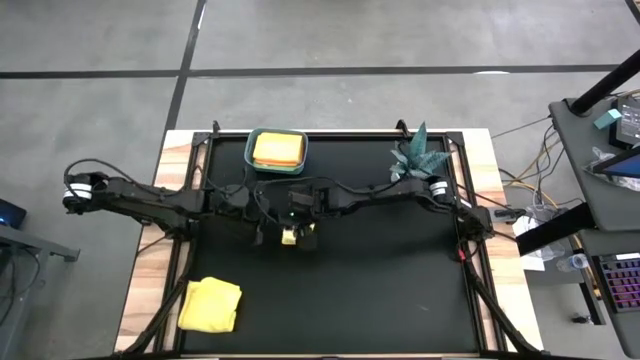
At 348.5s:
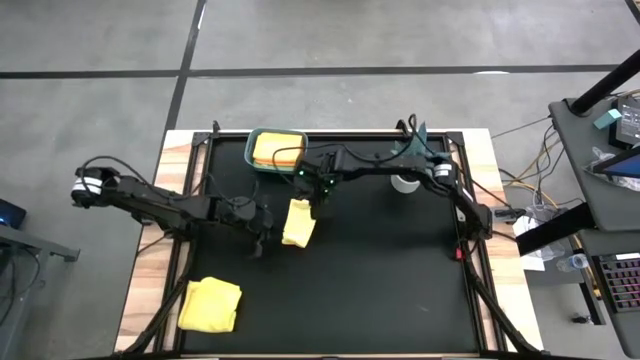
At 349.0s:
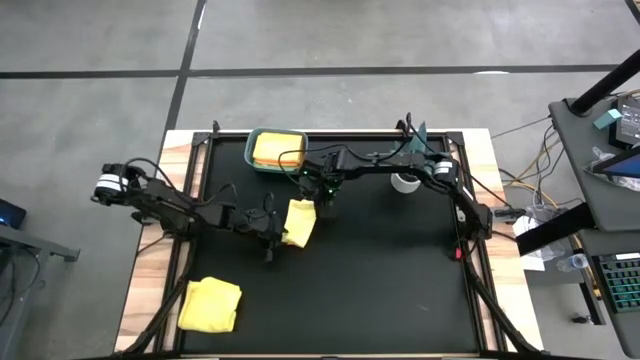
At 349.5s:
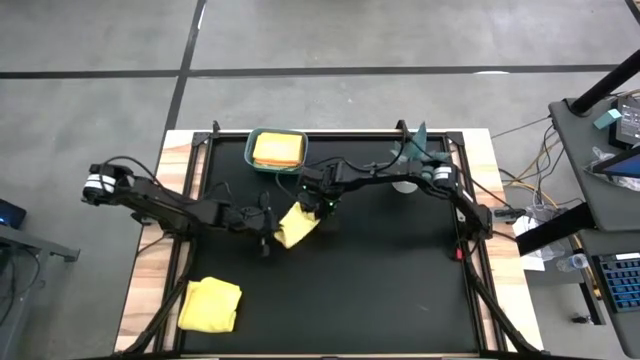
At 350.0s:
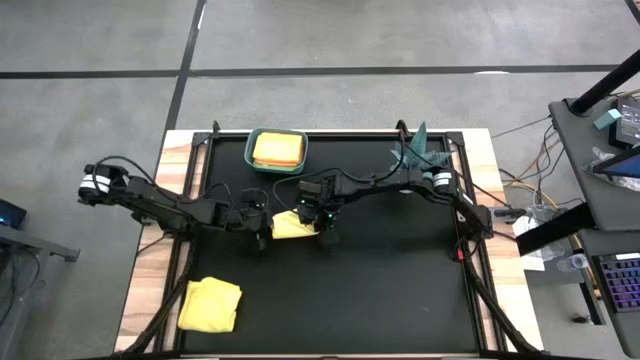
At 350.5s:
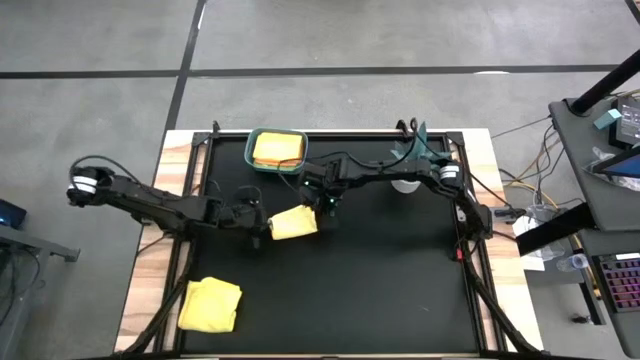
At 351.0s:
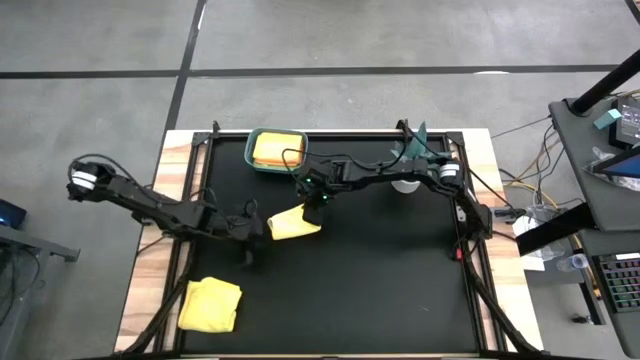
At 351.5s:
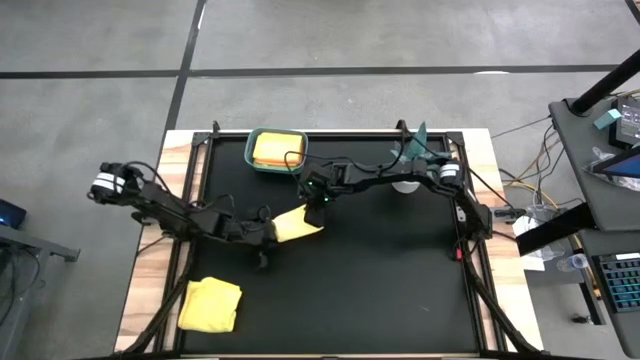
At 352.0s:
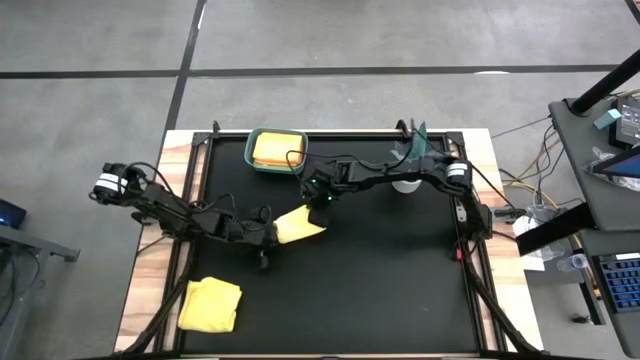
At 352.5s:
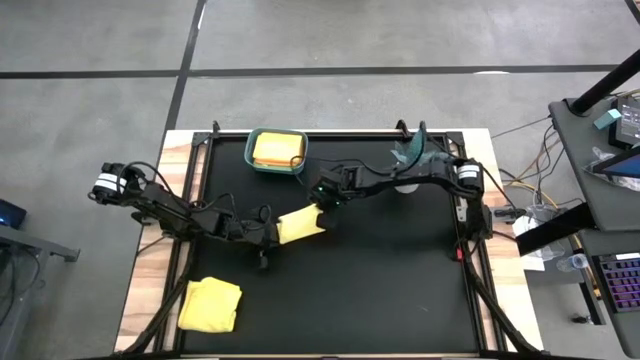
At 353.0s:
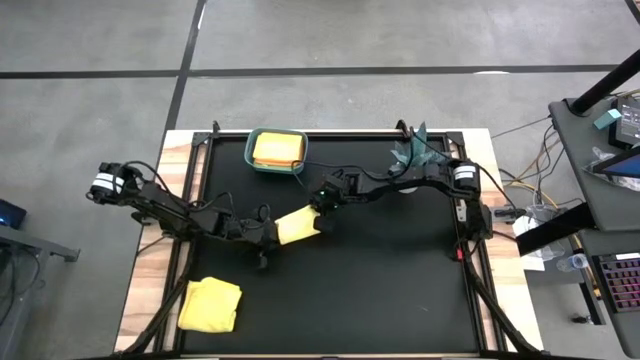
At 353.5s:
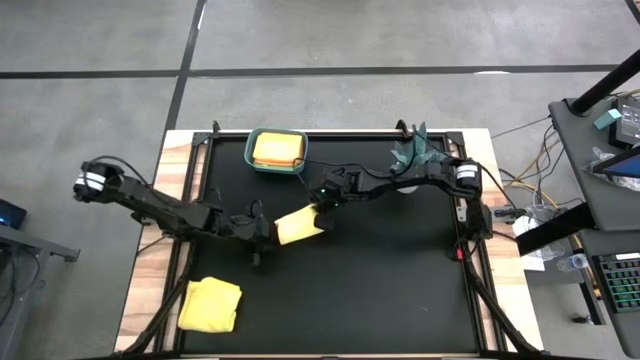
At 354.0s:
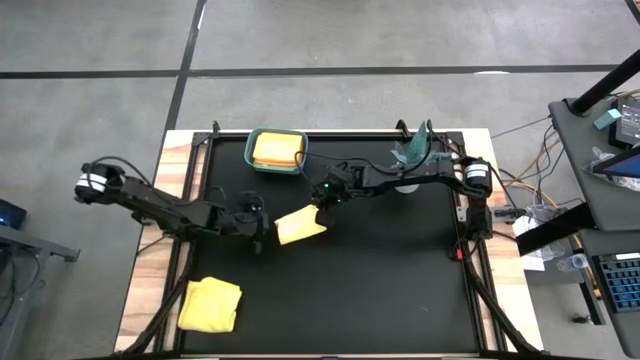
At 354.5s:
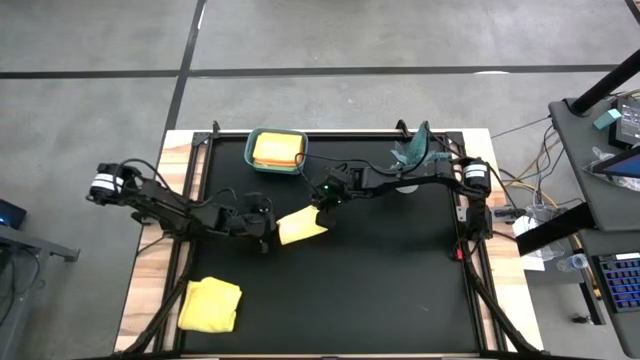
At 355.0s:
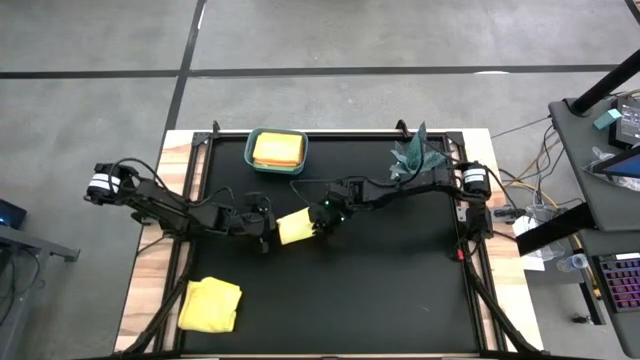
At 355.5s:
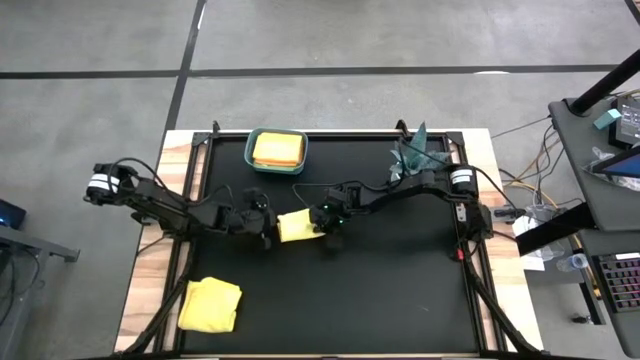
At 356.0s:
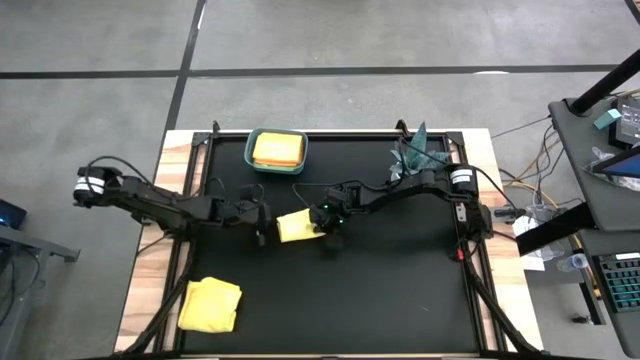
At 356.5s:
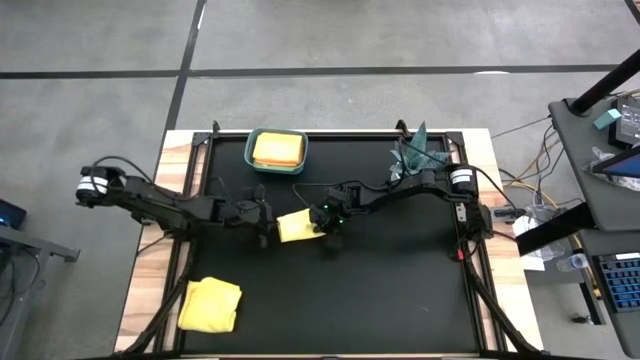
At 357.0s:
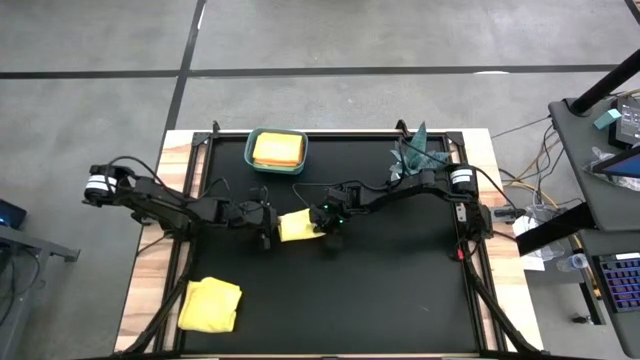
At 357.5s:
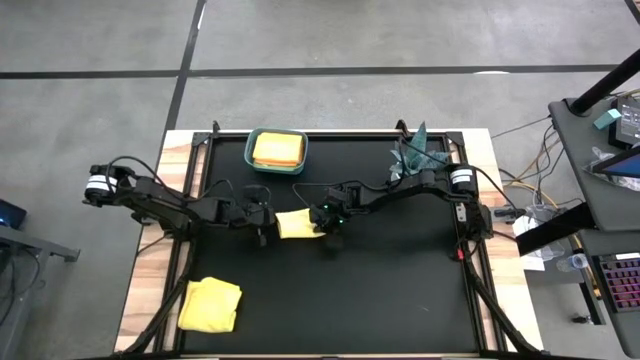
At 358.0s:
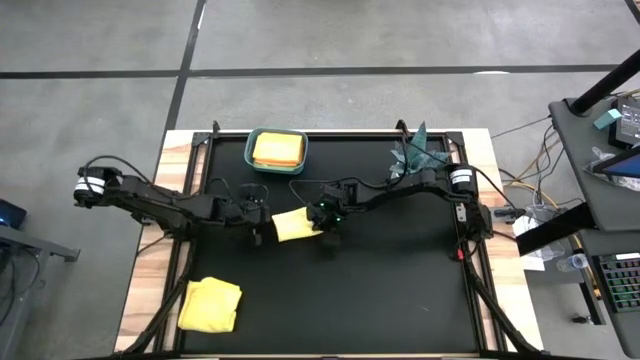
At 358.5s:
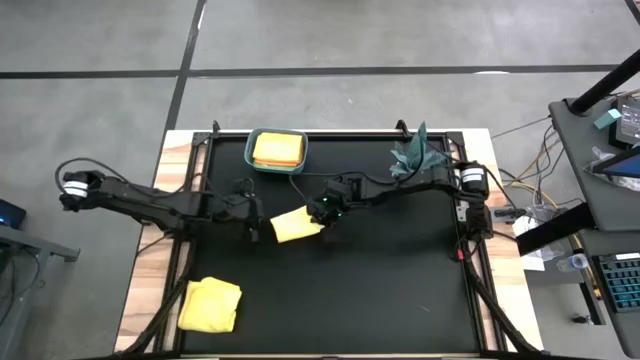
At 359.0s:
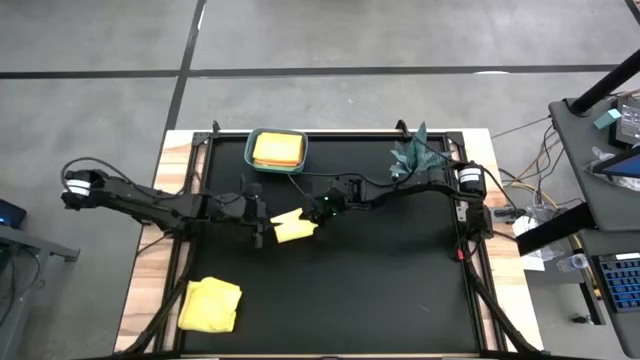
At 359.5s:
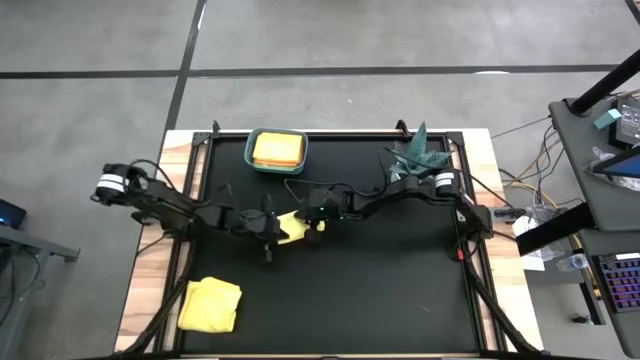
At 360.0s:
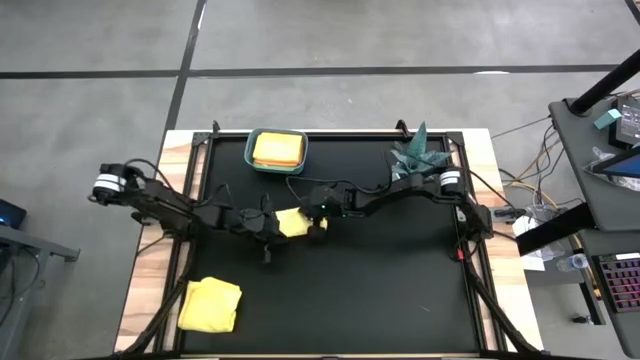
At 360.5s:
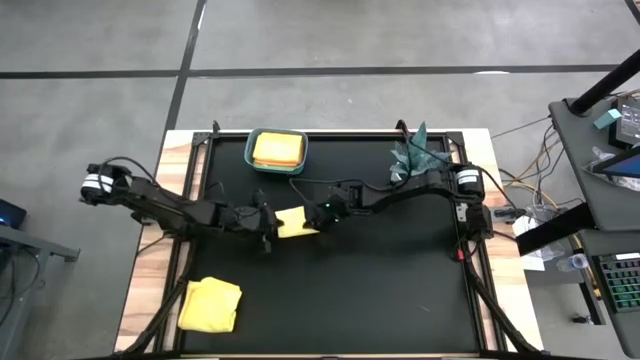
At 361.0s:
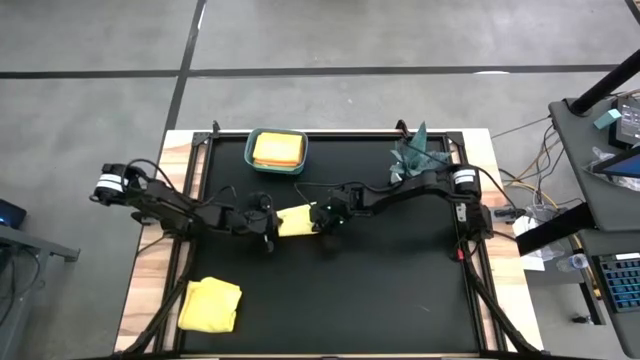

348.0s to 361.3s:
Task: Fold microfiber towels
Fold the right yellow microfiber cloth

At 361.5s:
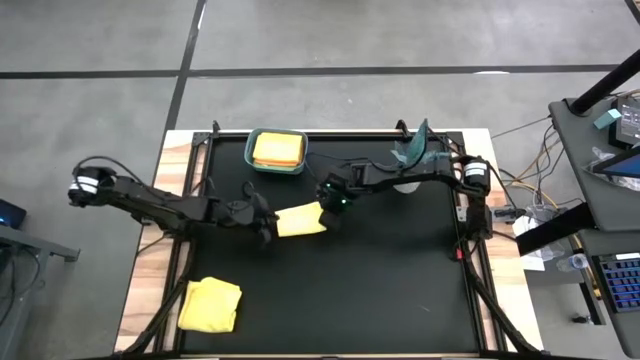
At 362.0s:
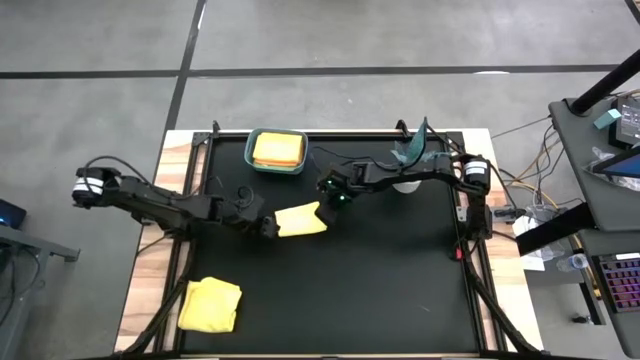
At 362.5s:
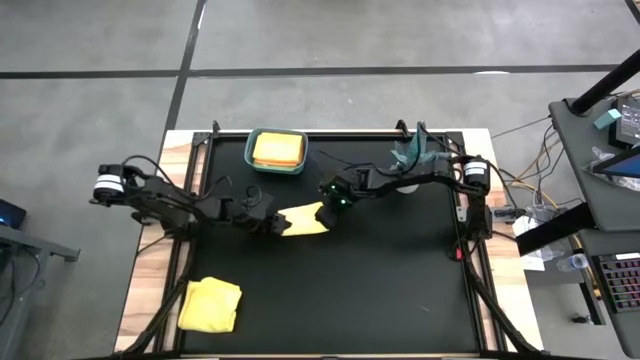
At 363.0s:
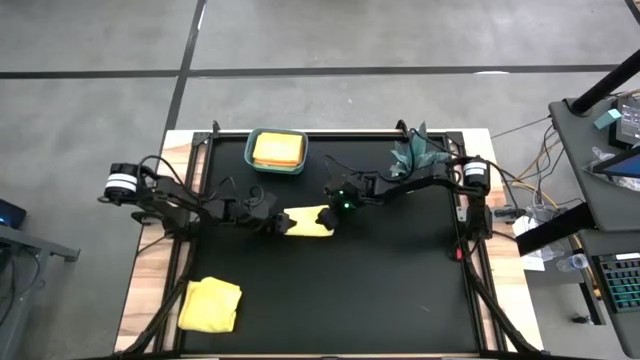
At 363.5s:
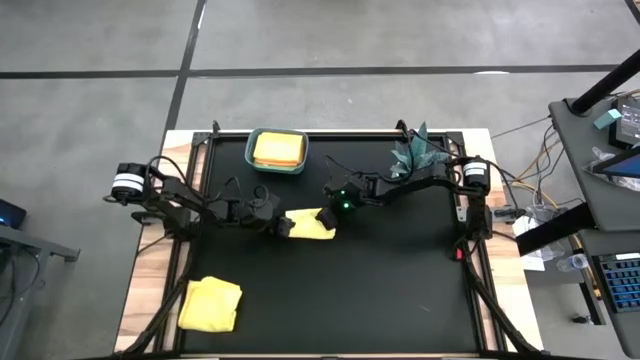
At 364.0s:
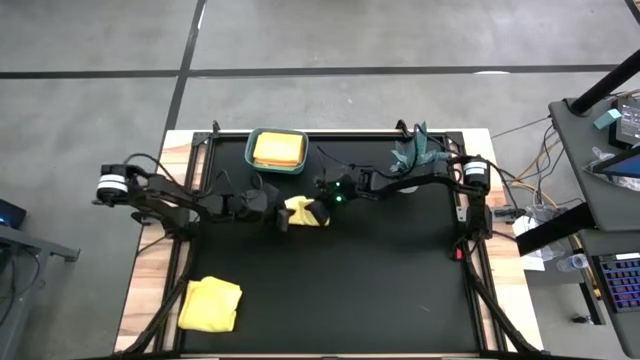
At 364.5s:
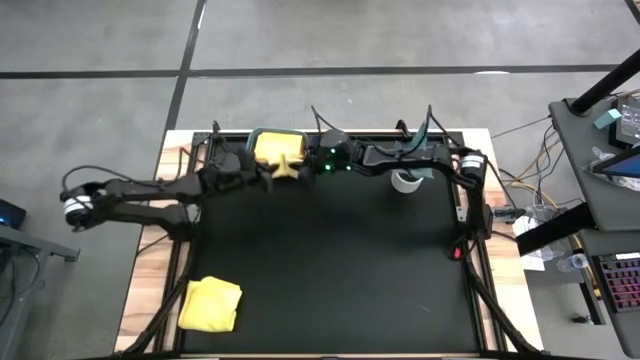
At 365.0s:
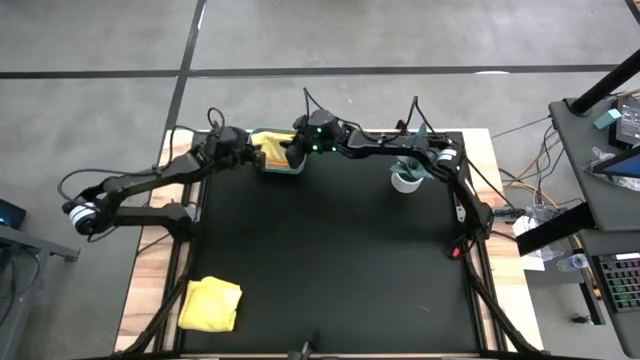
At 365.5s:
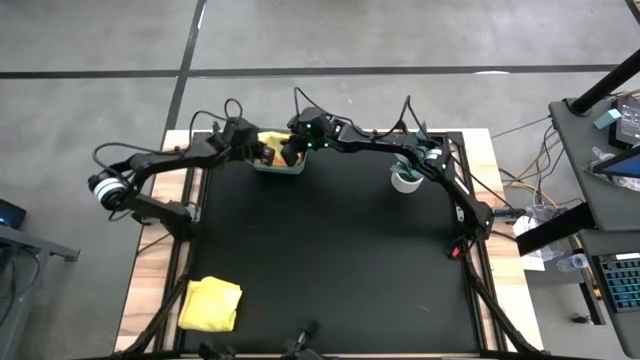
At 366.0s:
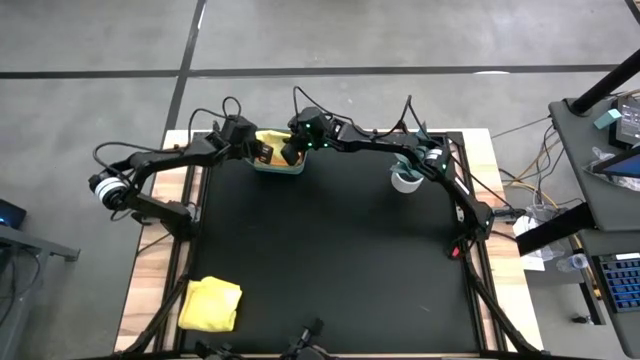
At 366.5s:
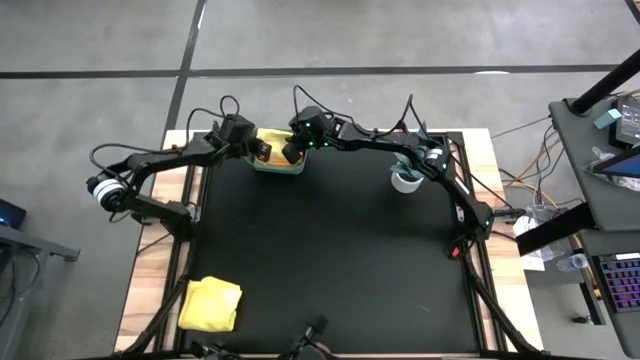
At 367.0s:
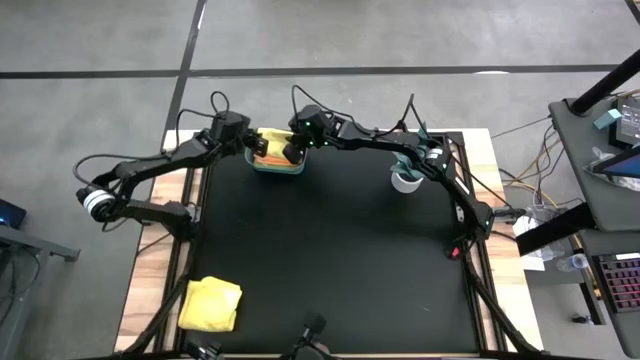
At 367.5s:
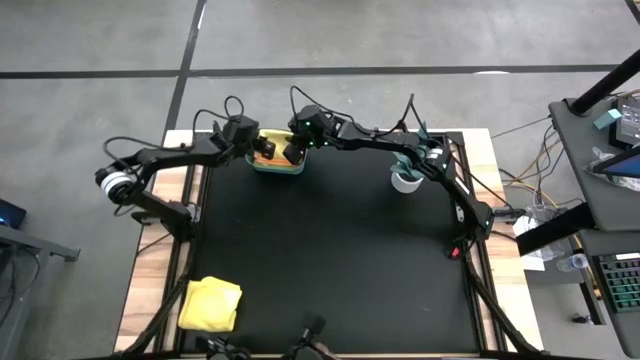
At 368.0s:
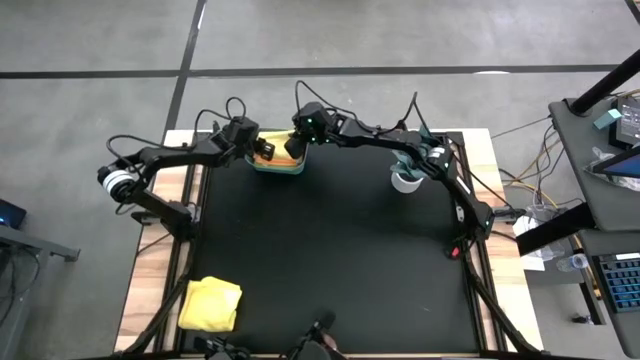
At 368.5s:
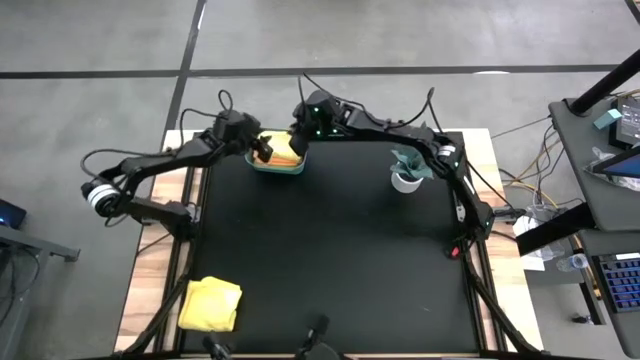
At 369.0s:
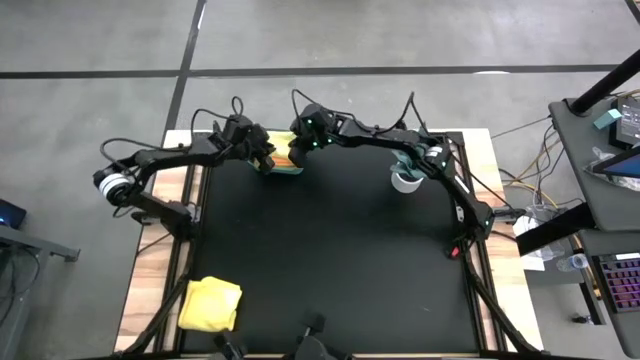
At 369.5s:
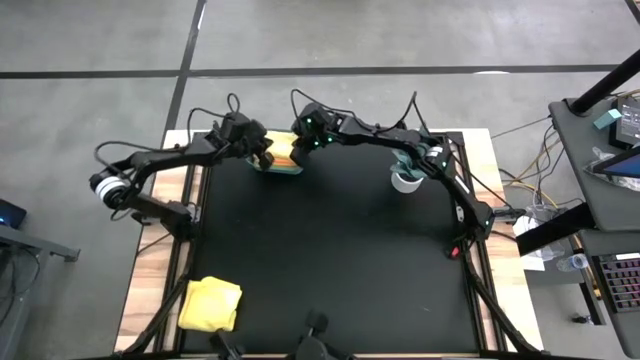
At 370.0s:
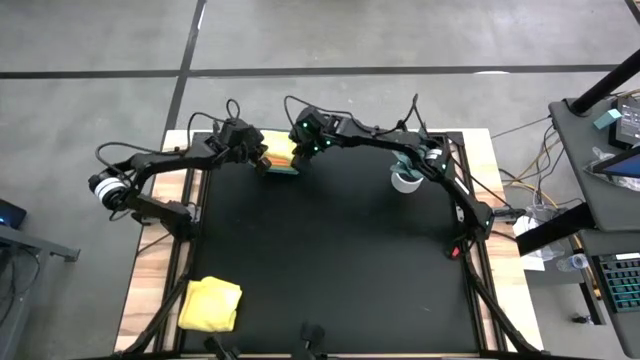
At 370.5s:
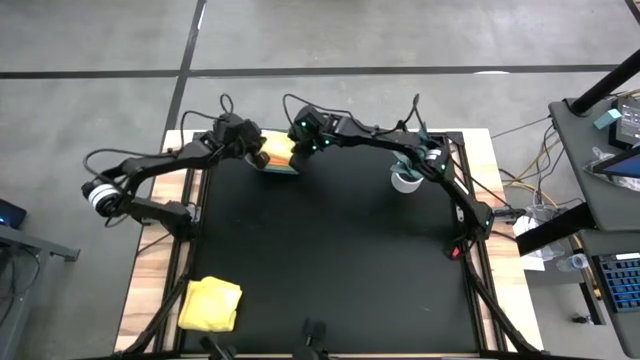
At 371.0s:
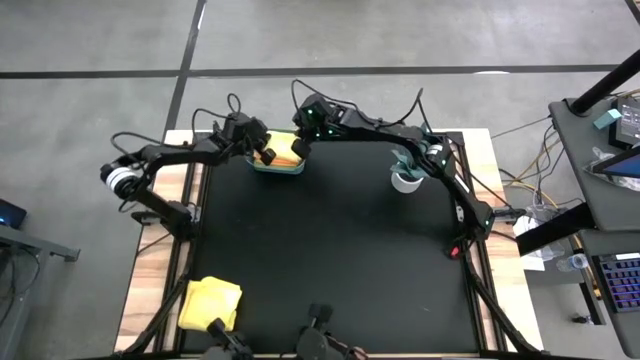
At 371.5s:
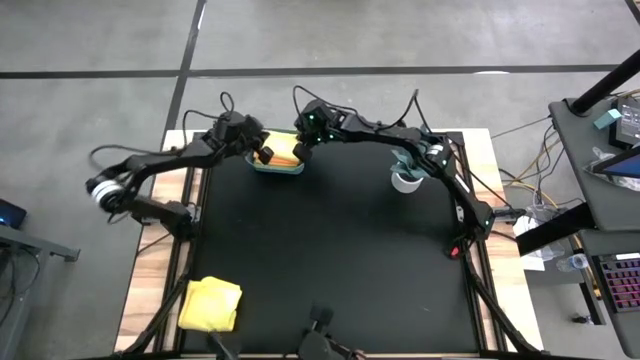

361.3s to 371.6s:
Put the right yellow microfiber cloth into the blue bin
